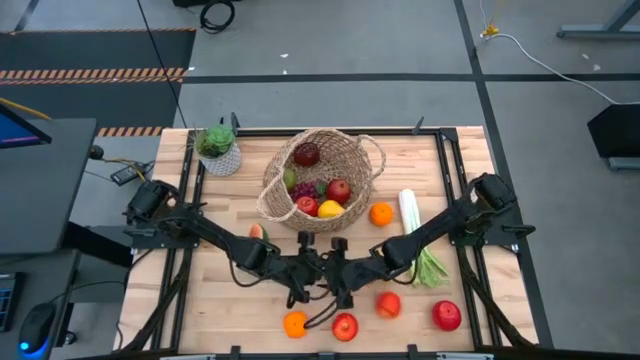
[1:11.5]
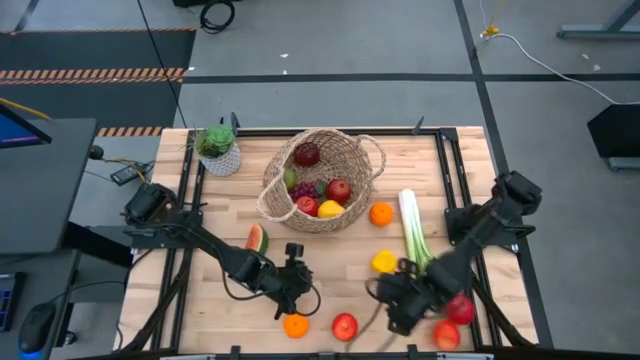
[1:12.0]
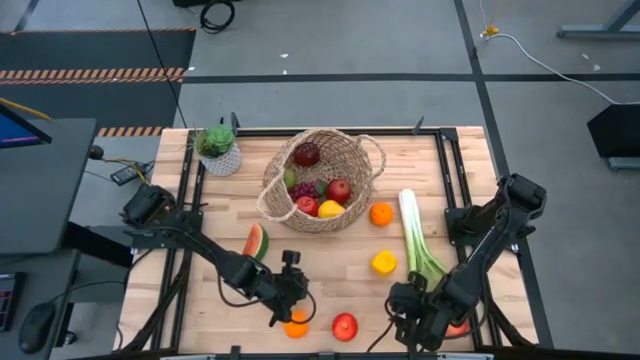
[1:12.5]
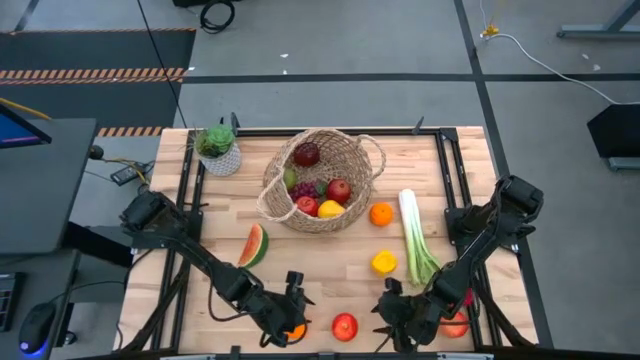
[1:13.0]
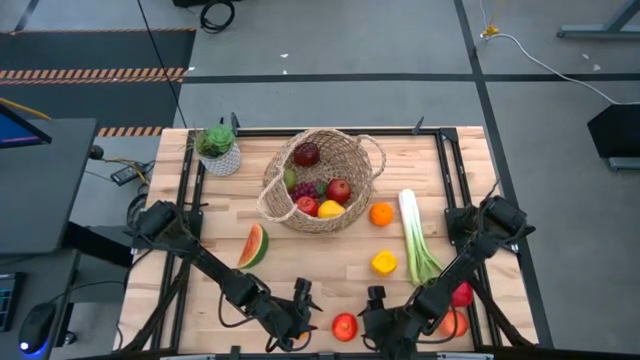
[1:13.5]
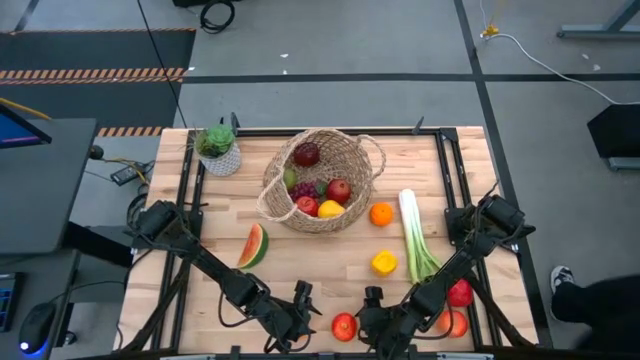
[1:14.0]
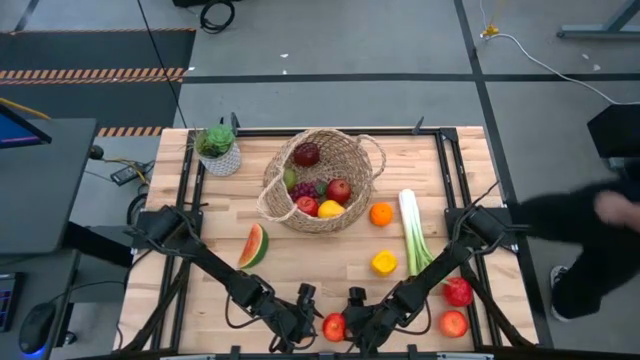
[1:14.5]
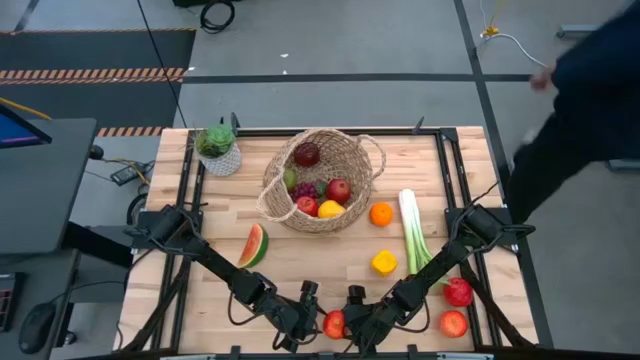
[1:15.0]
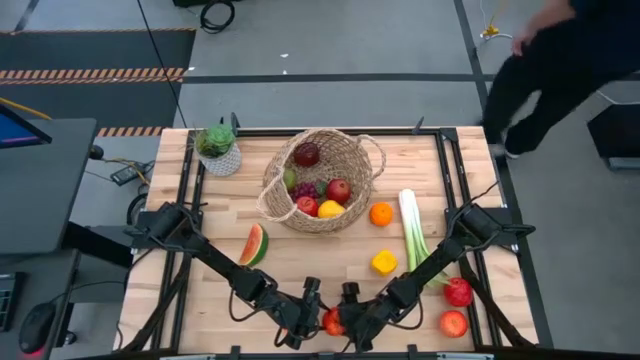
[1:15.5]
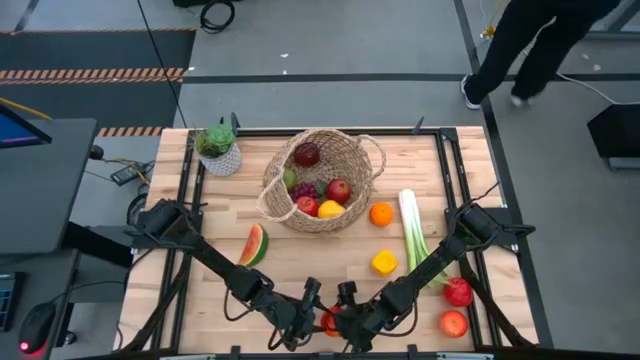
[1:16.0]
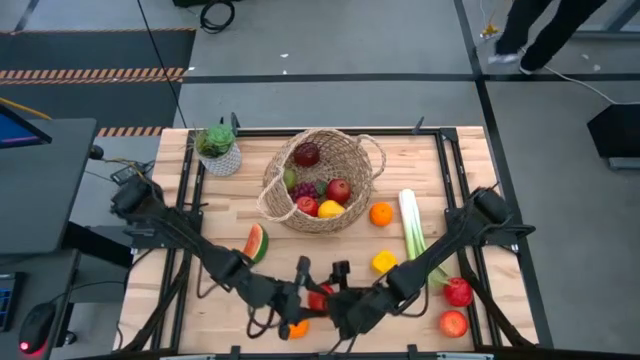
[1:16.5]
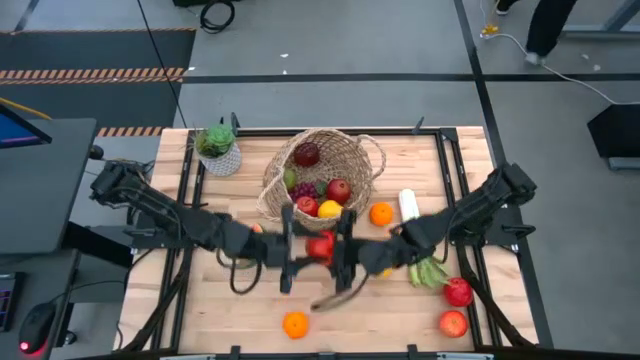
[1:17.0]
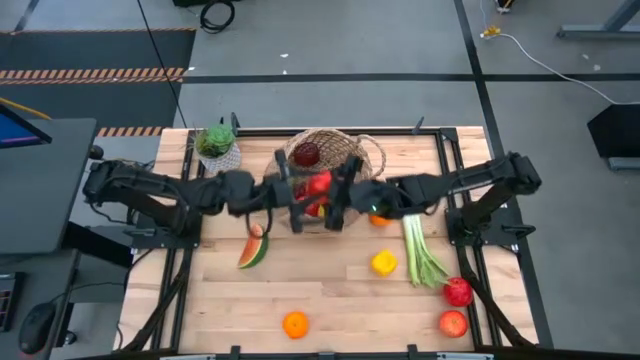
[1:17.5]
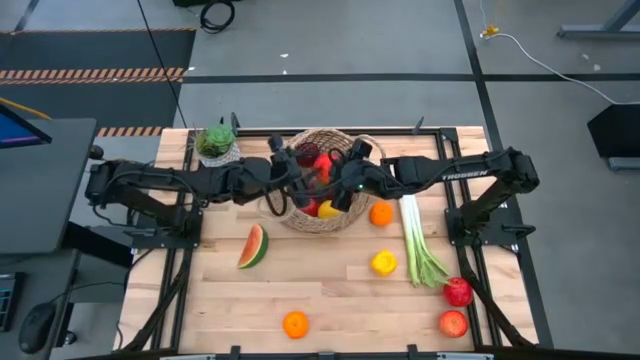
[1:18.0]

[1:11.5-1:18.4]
Task: Build produce basket
Put the apple into the basket

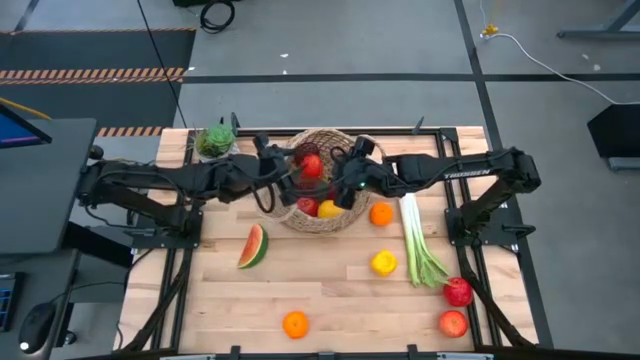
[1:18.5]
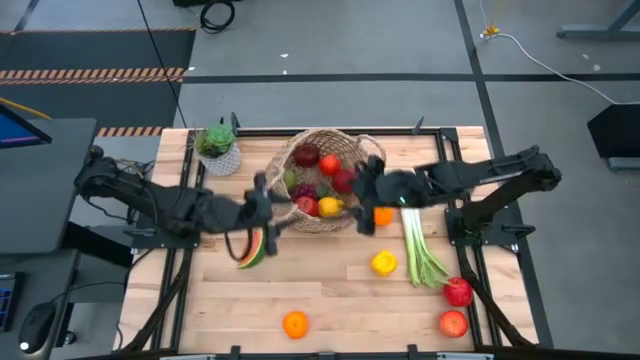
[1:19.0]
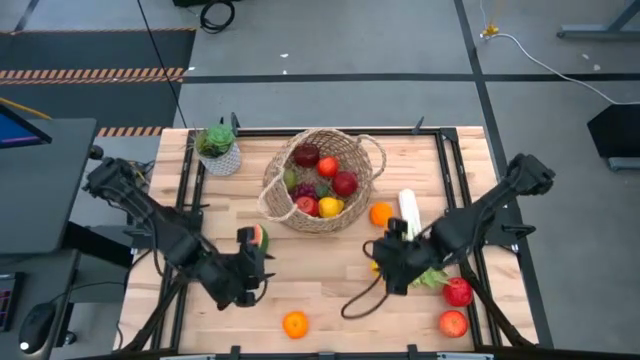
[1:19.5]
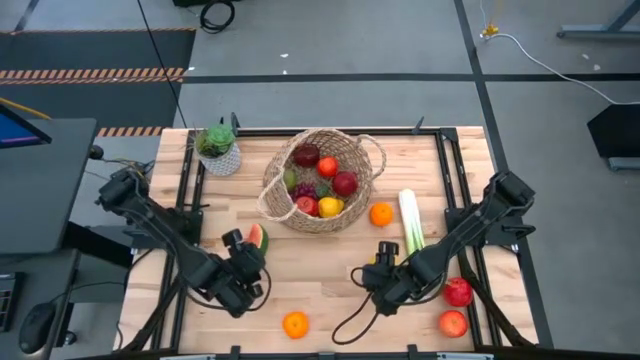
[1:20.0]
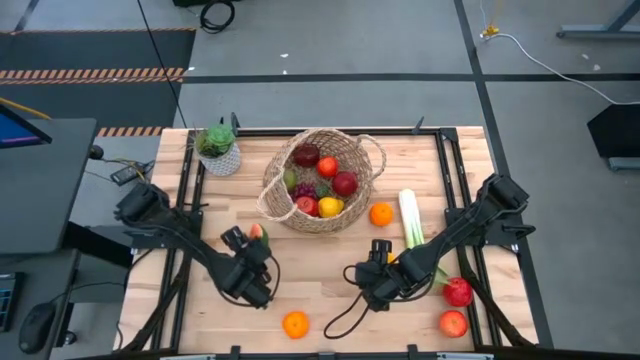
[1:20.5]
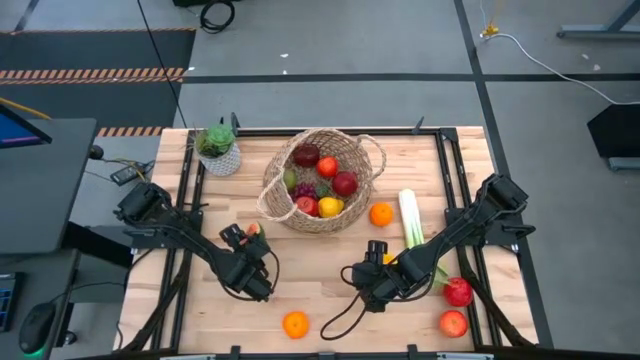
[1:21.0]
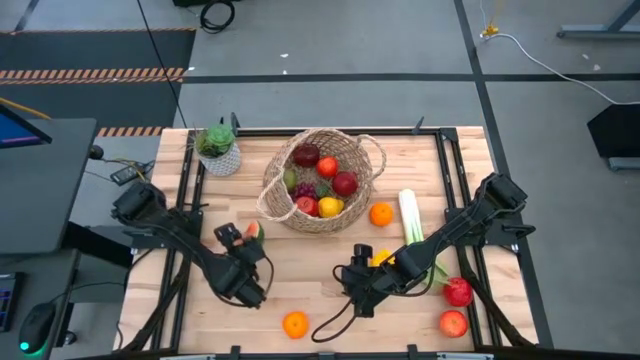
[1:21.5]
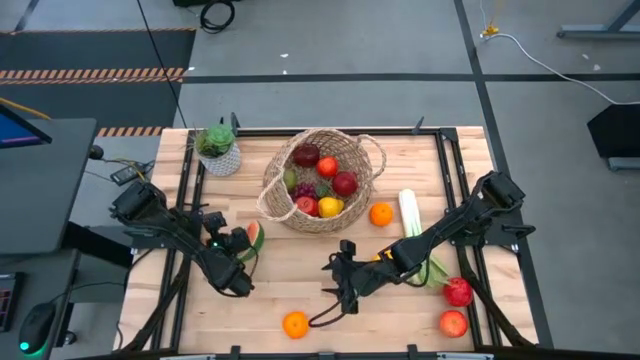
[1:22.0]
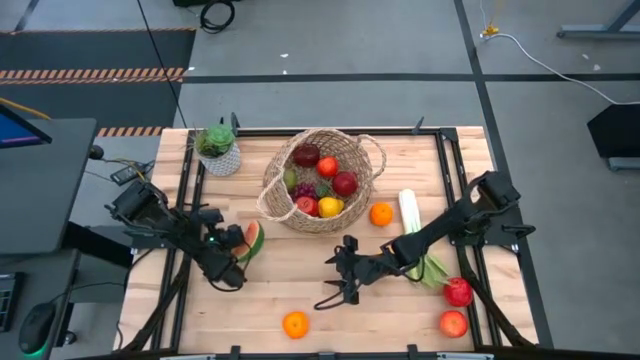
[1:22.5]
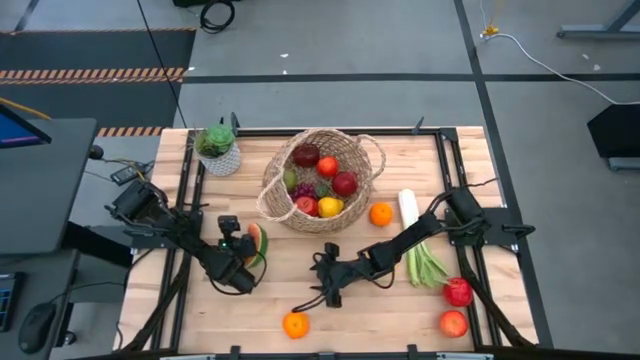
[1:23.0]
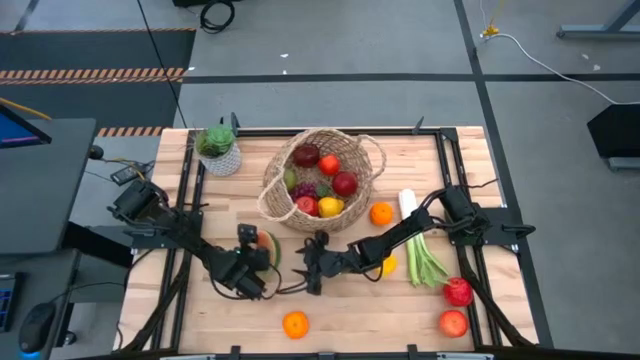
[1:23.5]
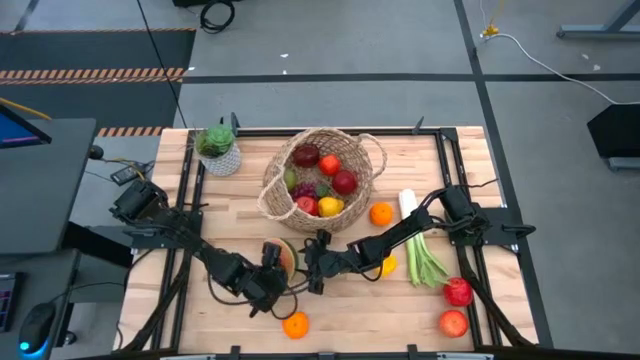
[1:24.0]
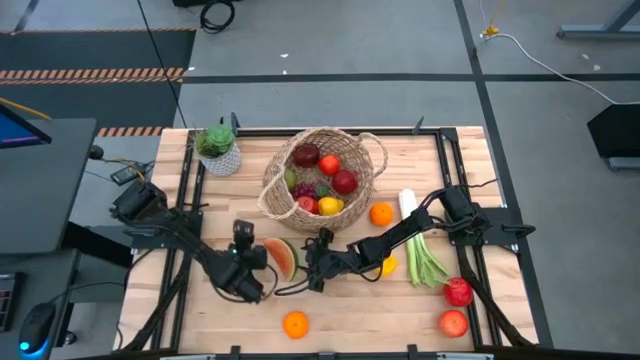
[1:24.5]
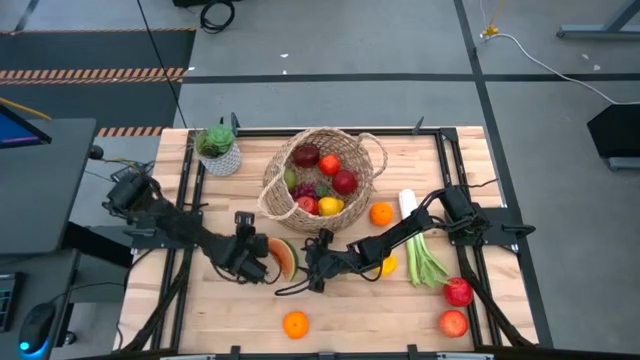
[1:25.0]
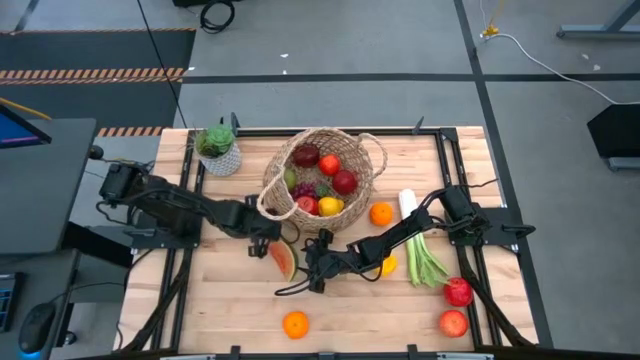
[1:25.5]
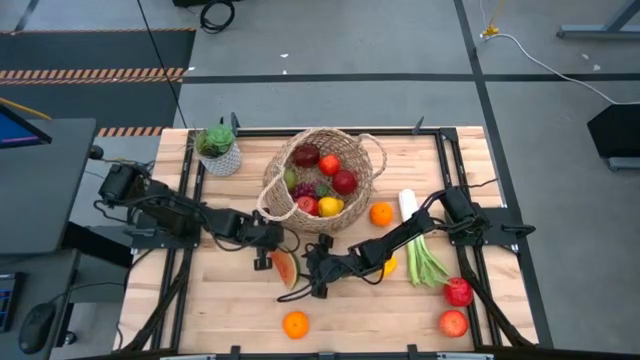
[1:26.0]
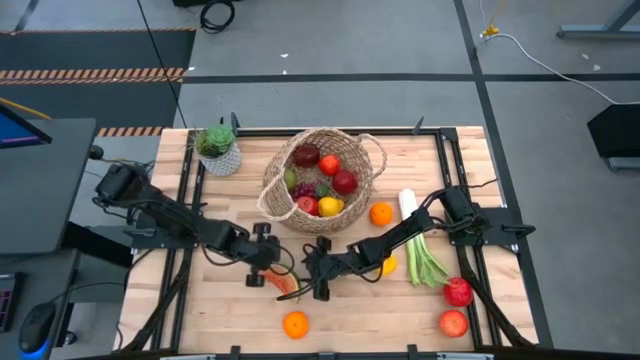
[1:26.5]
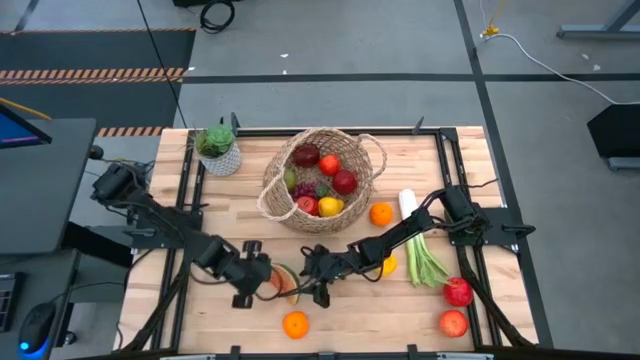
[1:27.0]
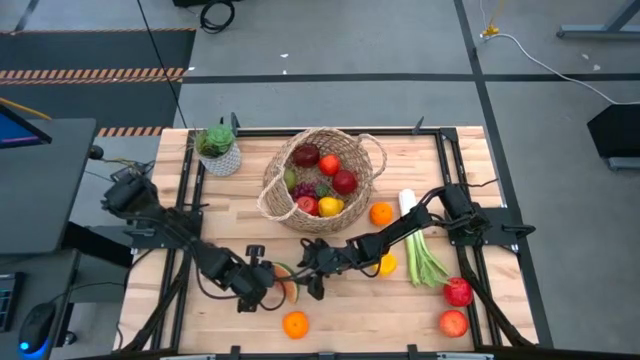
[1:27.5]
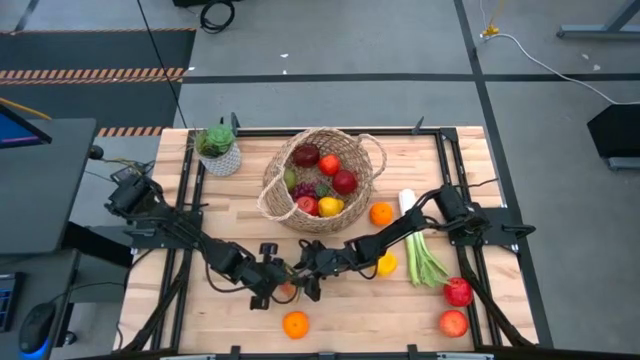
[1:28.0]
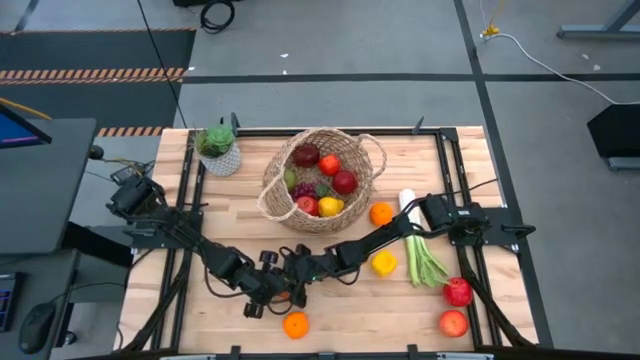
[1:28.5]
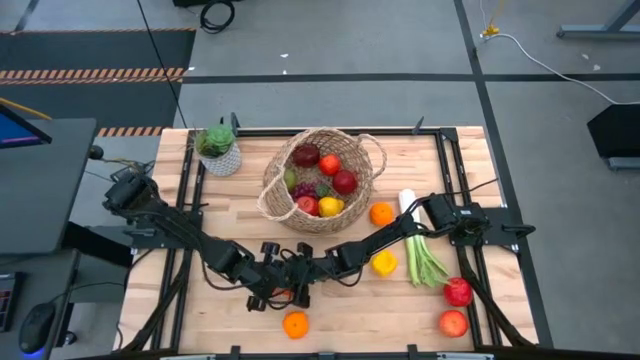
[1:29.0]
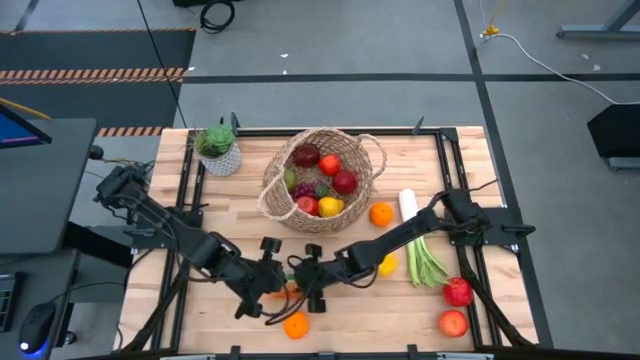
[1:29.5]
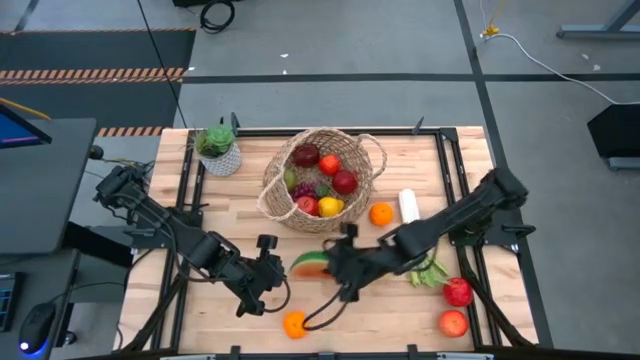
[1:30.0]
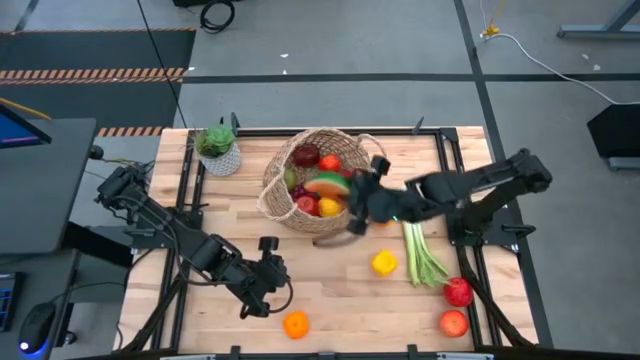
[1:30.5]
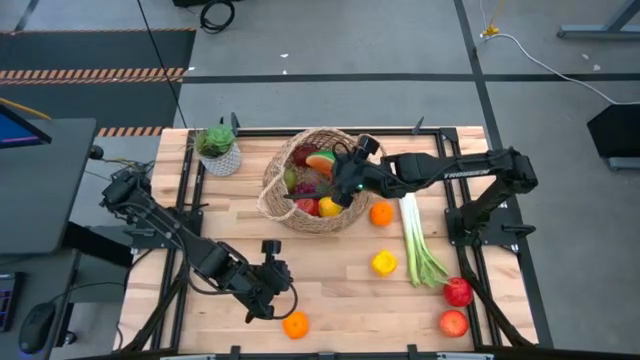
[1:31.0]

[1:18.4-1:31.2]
Put the watermelon into the basket

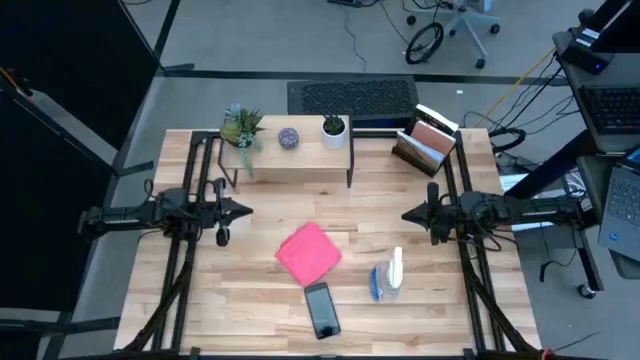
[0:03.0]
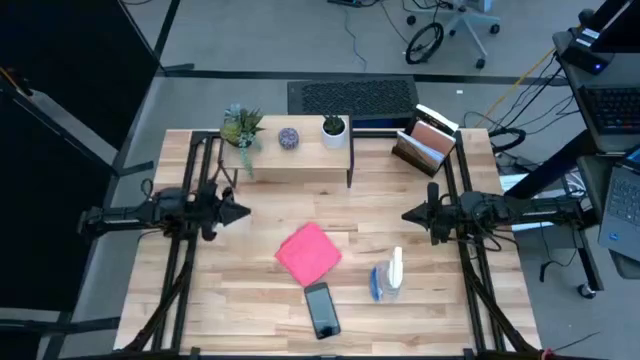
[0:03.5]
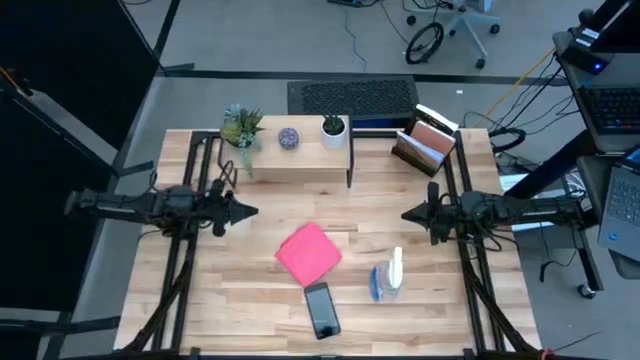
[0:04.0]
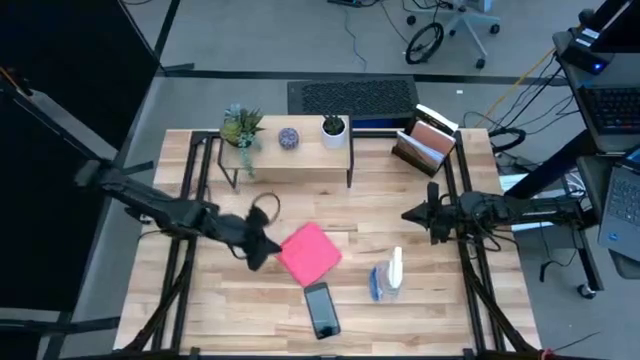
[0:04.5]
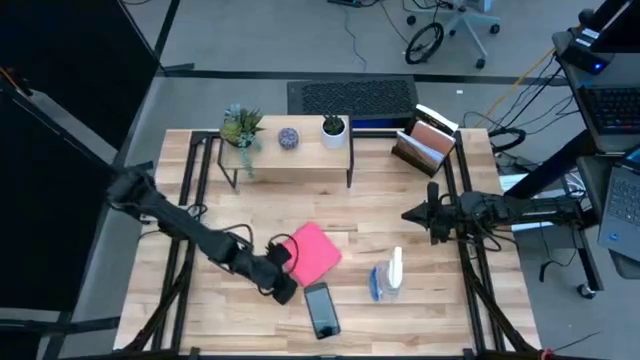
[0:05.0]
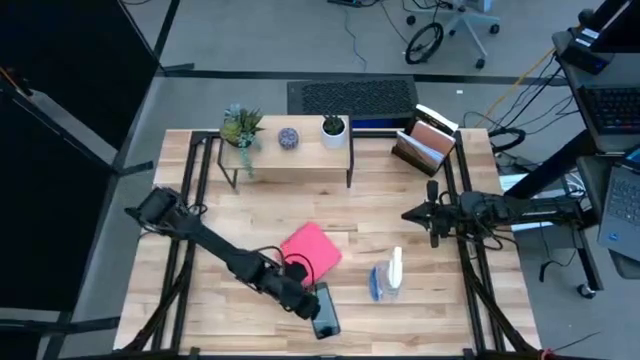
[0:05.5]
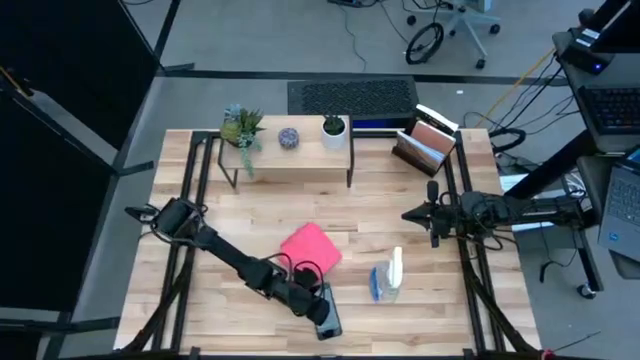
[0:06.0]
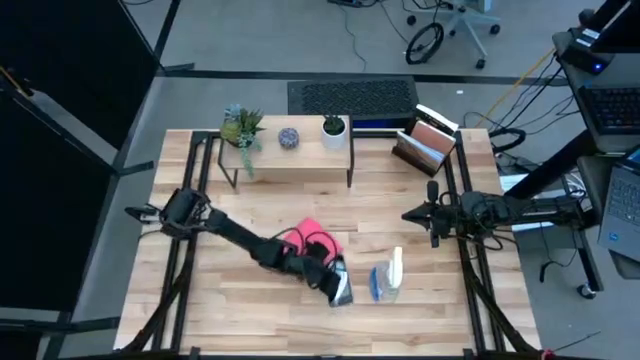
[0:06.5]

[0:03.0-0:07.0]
Task: Apply microfiber cloth
Prepare the cellphone
